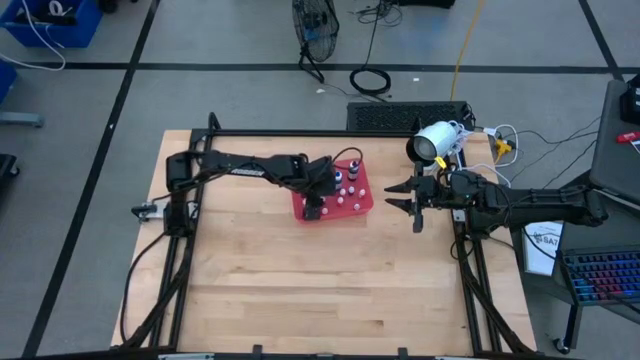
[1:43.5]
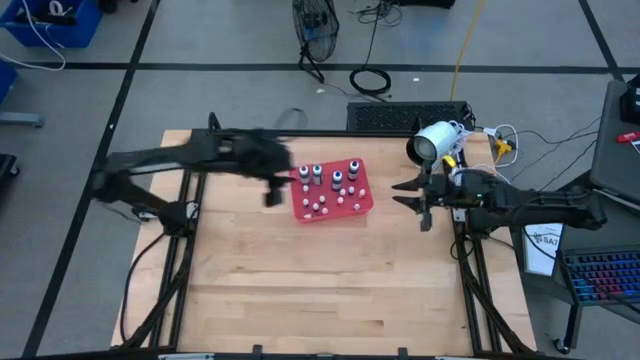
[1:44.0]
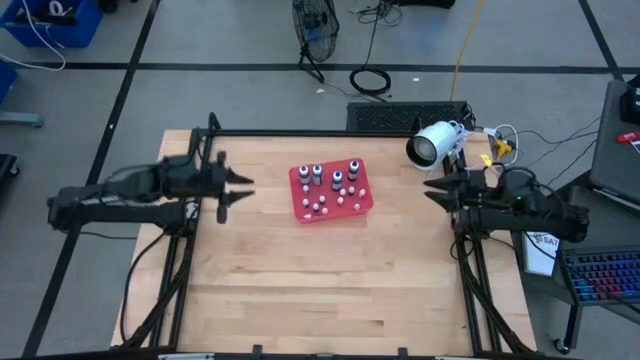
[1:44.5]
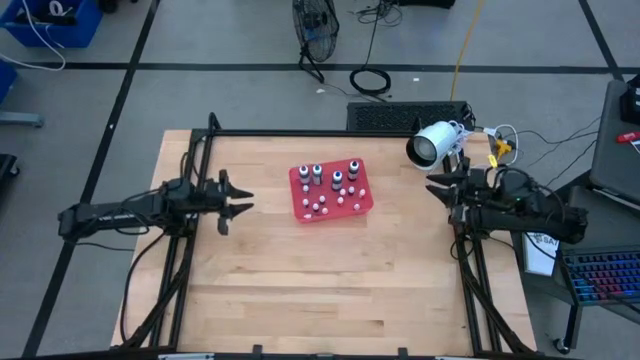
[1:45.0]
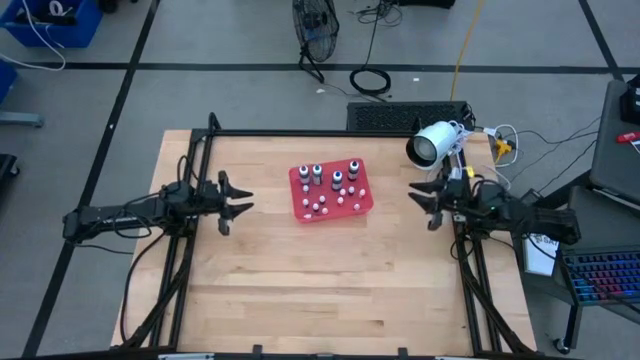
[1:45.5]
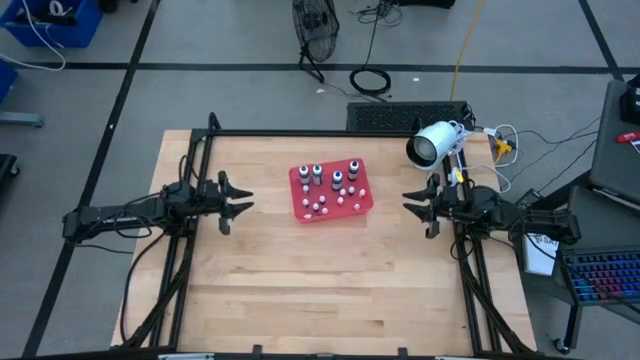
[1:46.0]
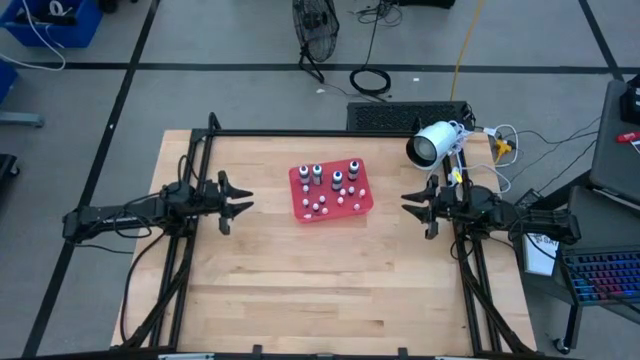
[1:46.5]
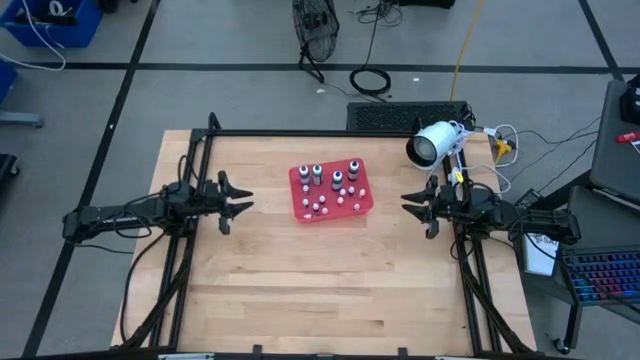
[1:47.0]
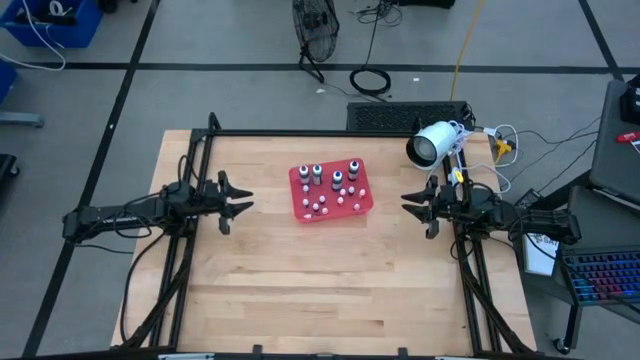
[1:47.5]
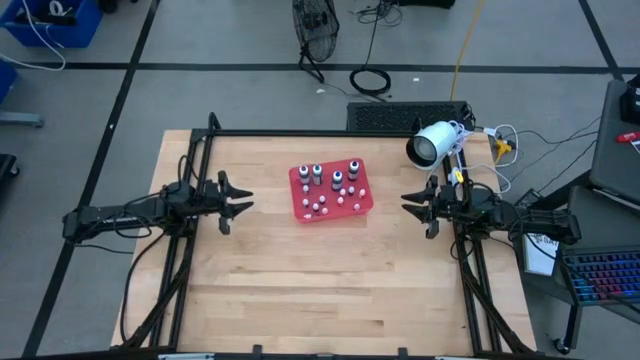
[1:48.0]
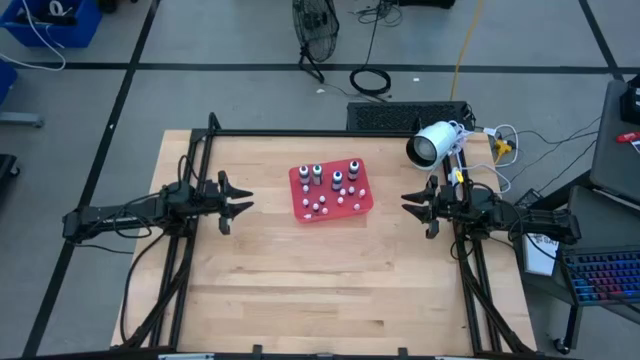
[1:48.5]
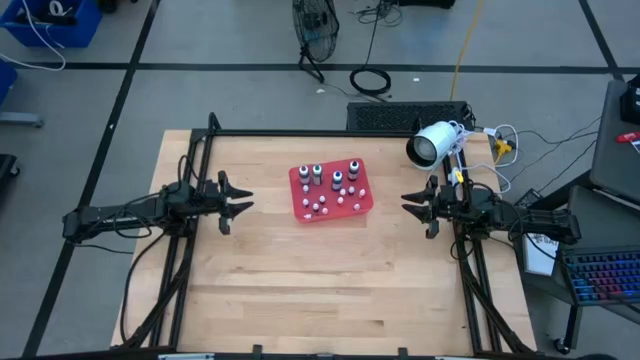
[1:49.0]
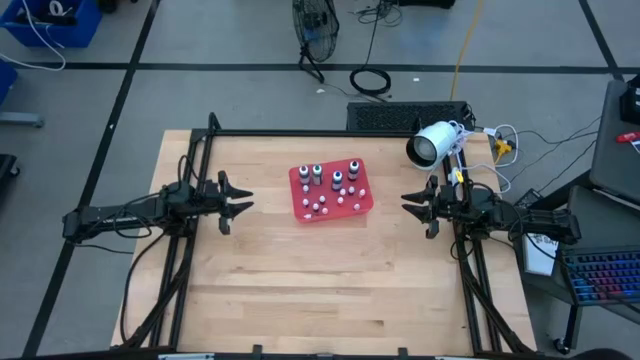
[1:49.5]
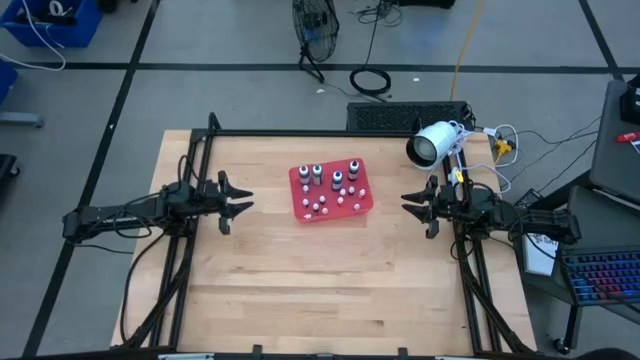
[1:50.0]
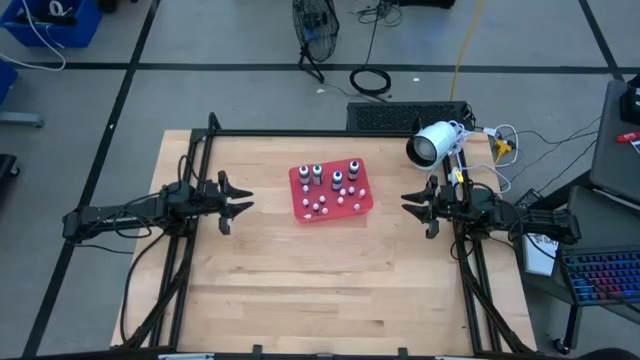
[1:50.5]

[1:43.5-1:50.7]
Task: Pick & Place food coloring
Return to Home Position

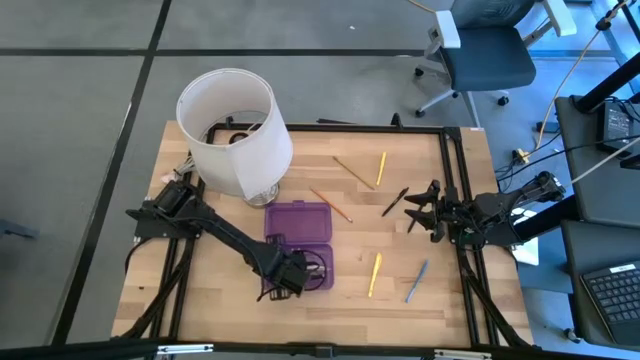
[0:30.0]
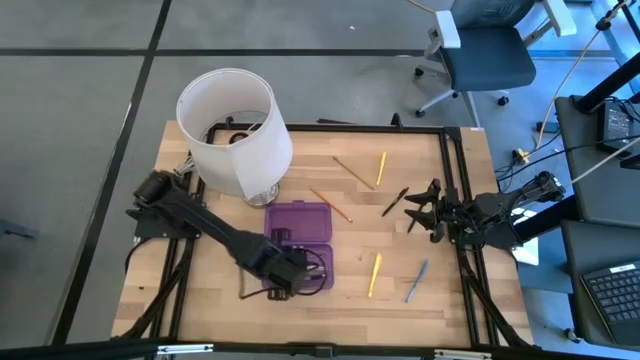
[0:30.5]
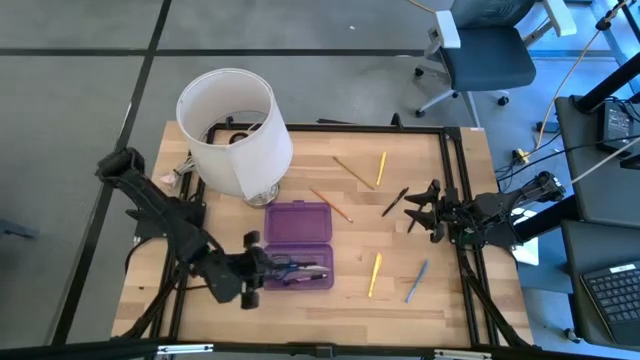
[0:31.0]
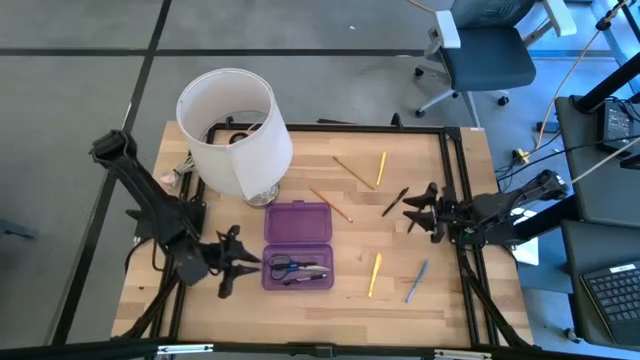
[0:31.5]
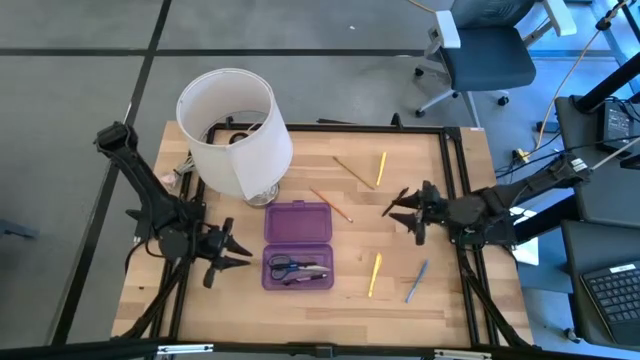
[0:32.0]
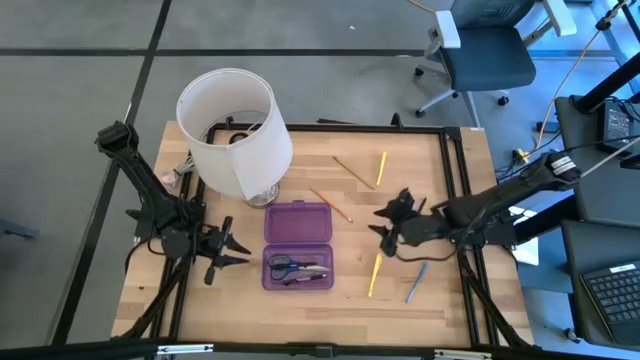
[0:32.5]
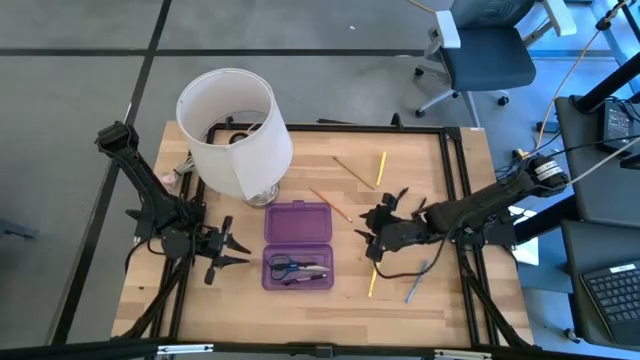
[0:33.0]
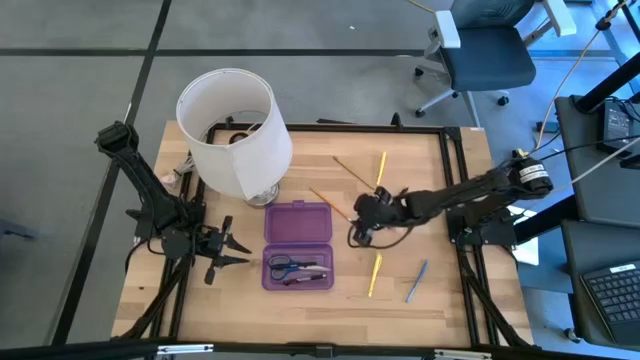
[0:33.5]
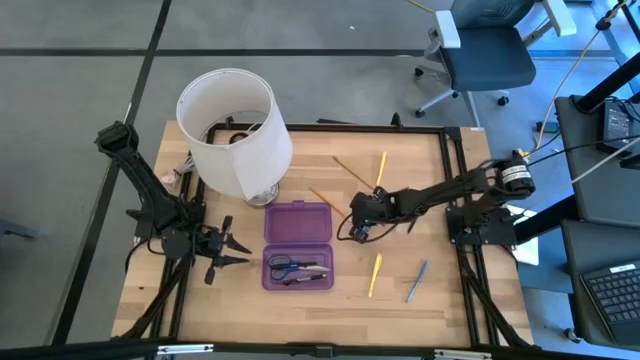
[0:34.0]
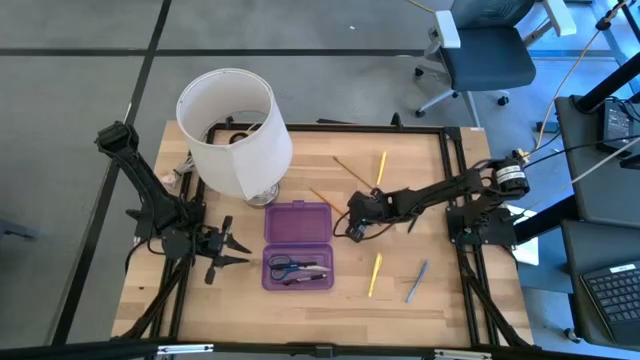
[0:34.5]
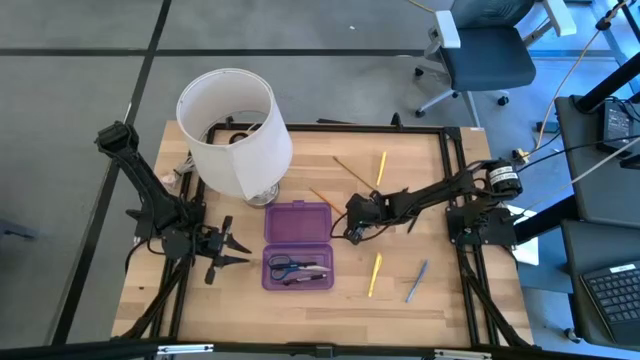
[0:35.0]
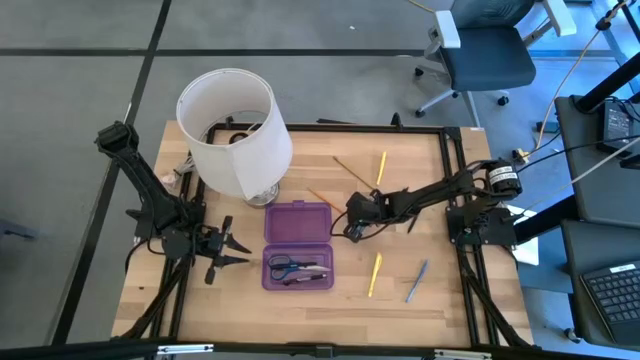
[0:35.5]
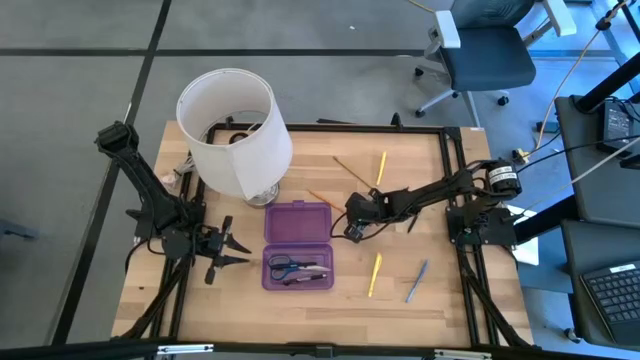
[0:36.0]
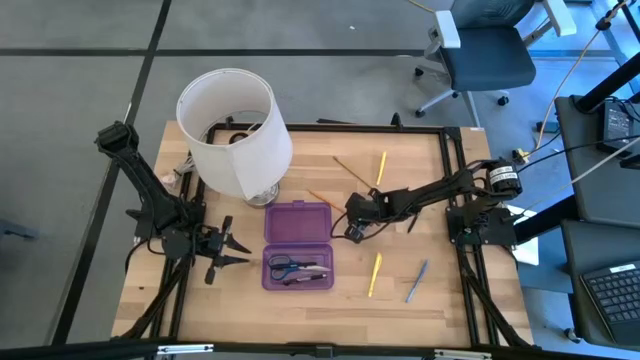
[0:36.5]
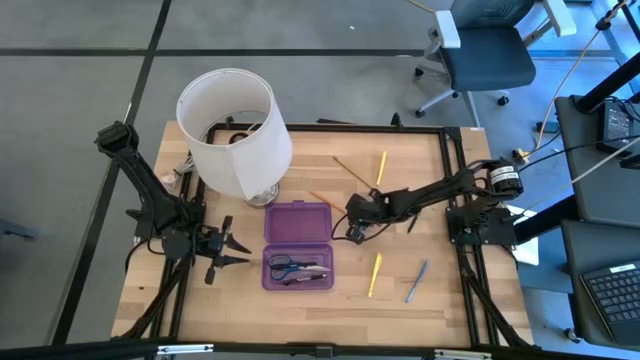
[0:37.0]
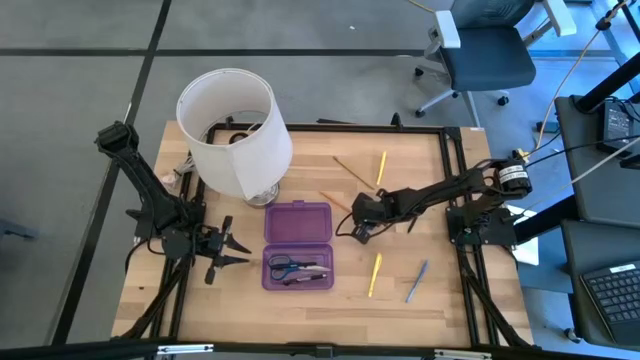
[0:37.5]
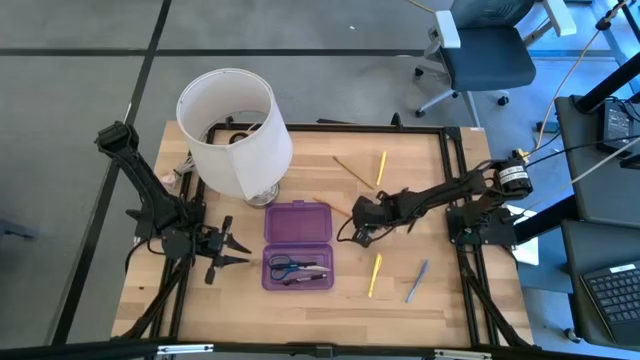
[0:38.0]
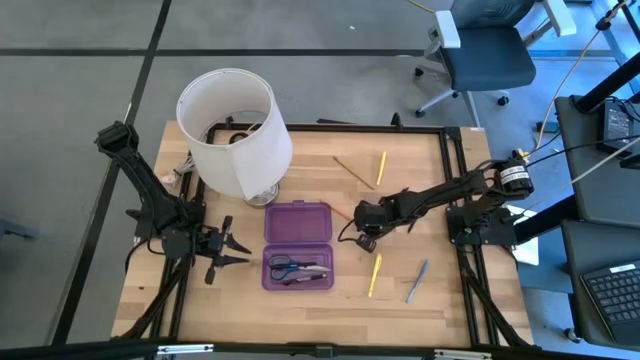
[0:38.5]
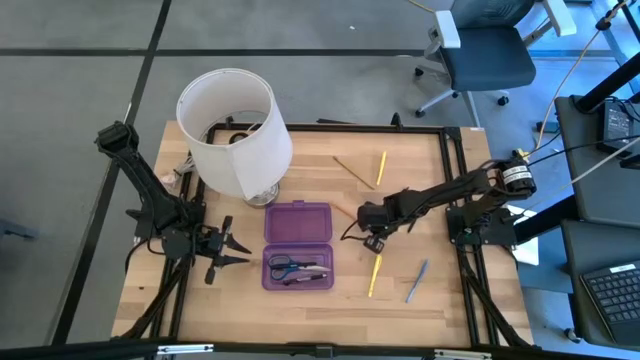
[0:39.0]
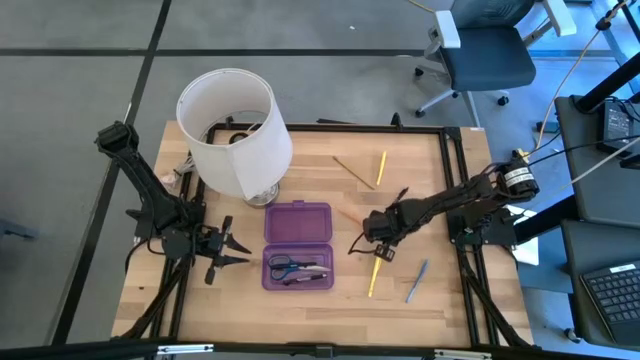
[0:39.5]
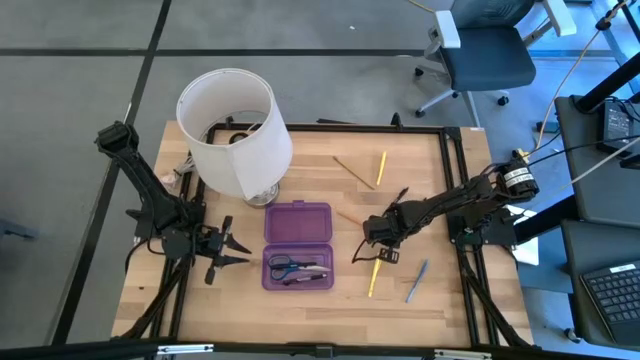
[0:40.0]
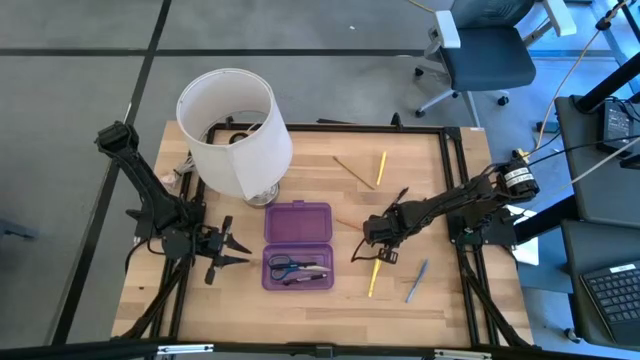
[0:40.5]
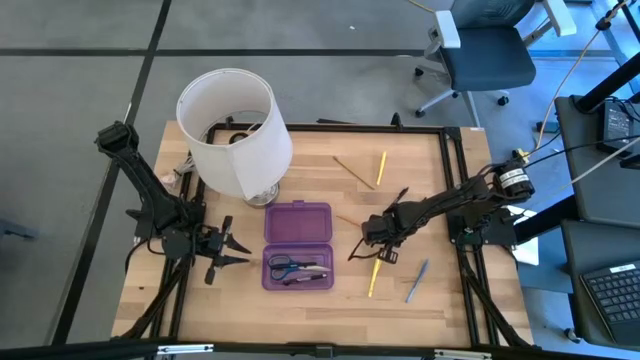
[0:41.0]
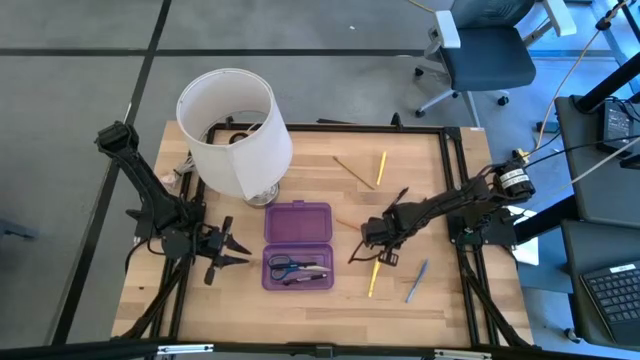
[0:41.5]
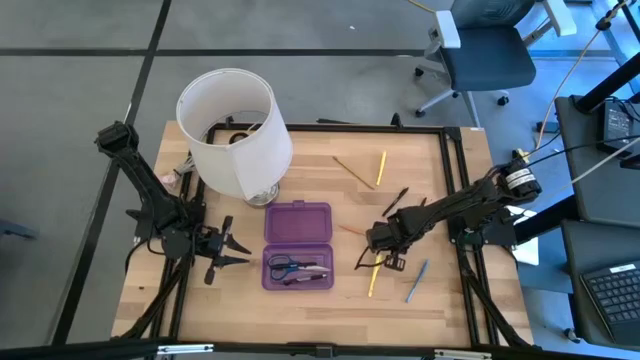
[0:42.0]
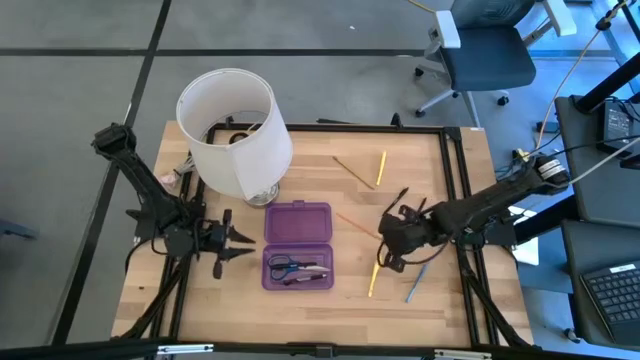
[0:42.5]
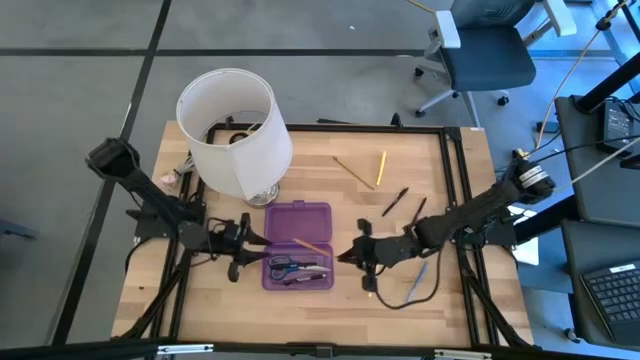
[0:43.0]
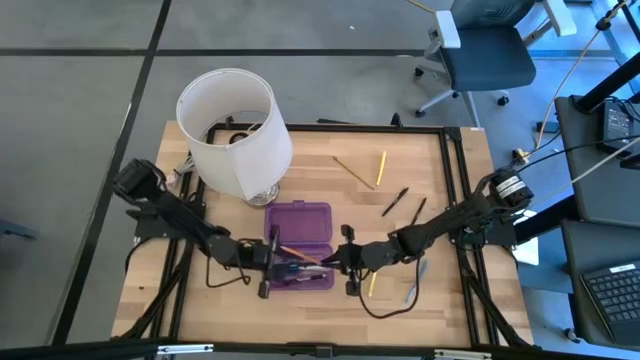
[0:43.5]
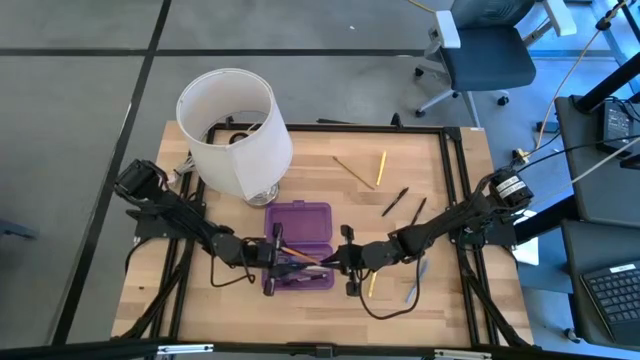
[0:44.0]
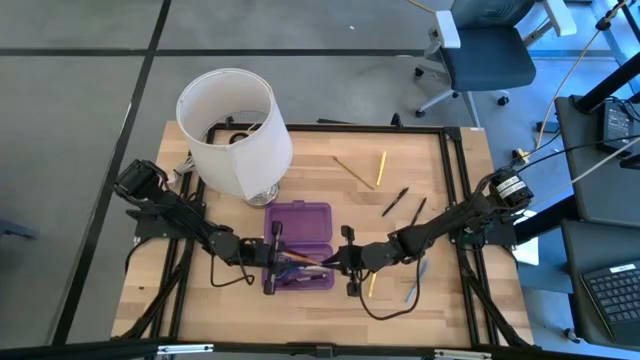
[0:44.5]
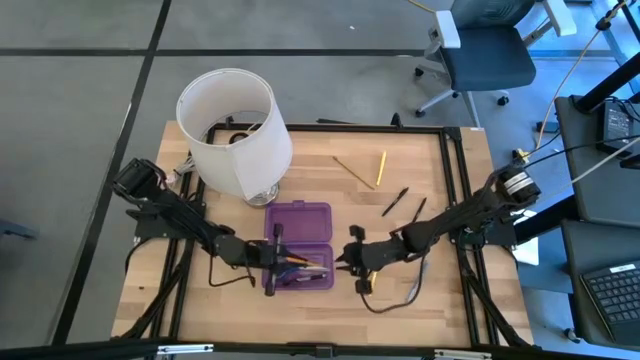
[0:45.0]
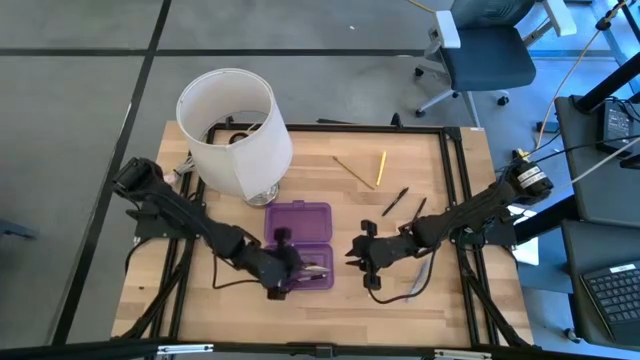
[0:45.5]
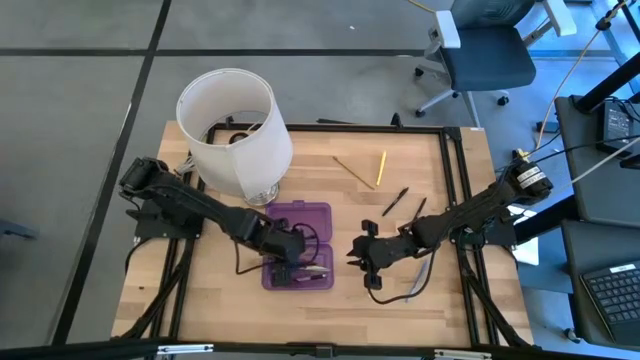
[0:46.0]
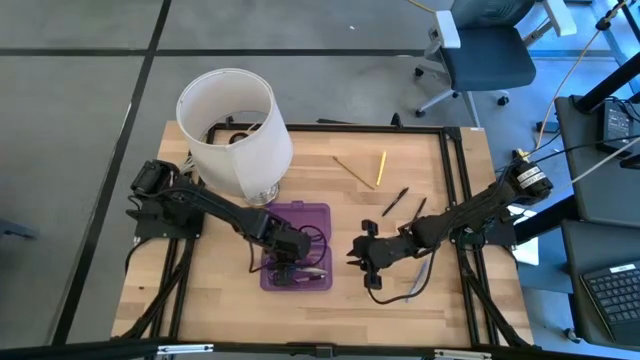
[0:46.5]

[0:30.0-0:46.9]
Task: Pick & place school supplies into a supply box
Put the orange pencil into the purple supply box
